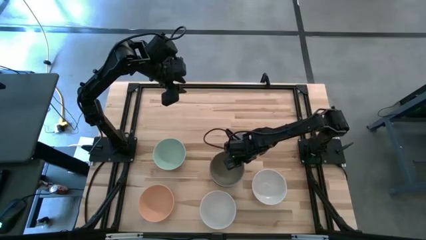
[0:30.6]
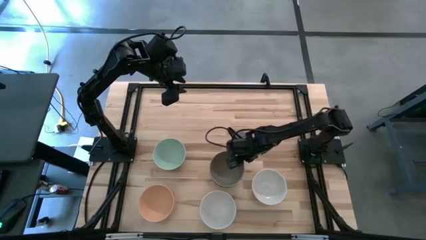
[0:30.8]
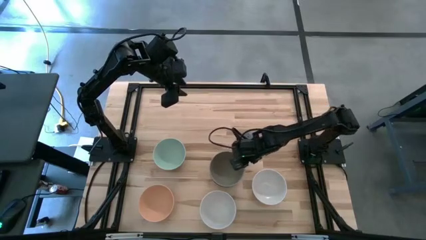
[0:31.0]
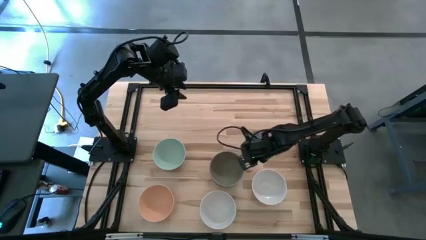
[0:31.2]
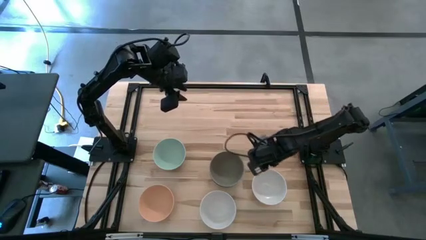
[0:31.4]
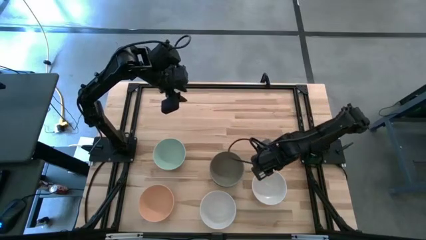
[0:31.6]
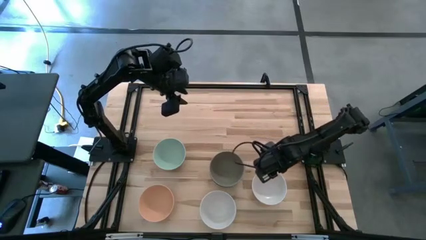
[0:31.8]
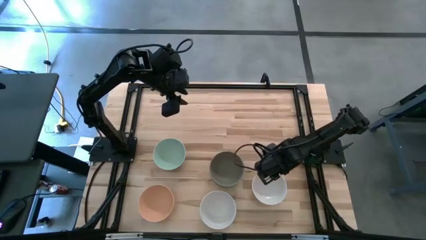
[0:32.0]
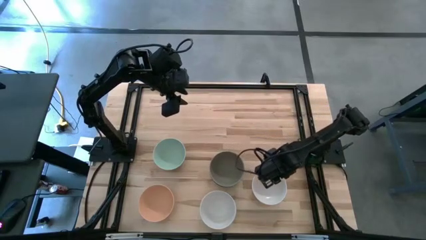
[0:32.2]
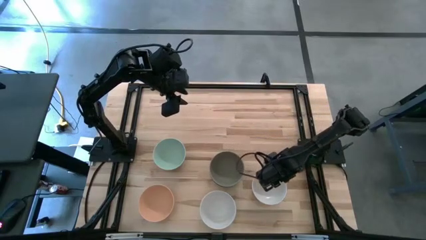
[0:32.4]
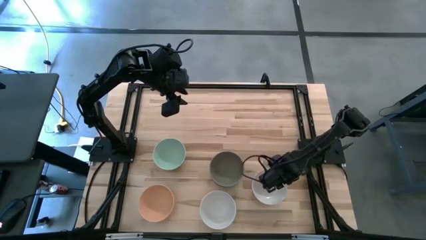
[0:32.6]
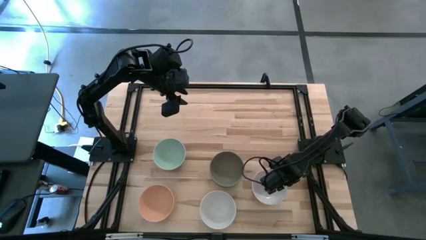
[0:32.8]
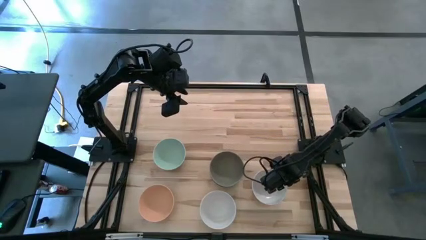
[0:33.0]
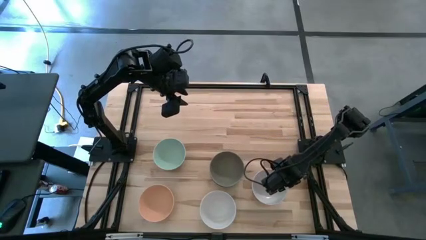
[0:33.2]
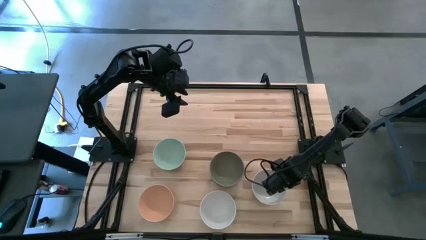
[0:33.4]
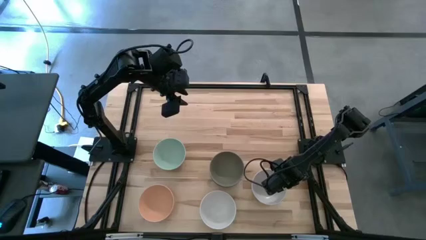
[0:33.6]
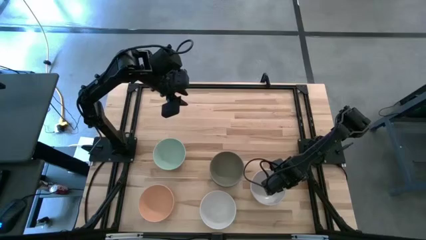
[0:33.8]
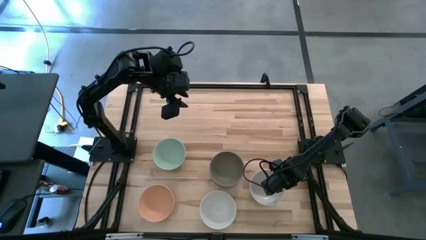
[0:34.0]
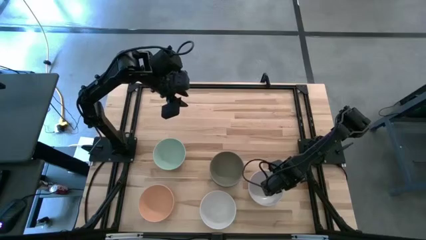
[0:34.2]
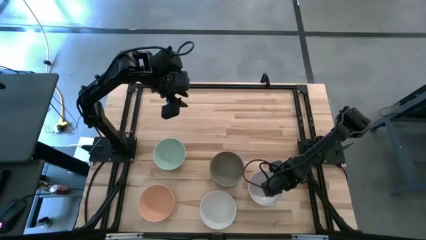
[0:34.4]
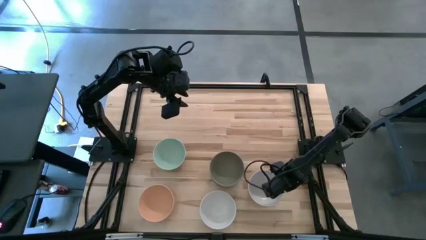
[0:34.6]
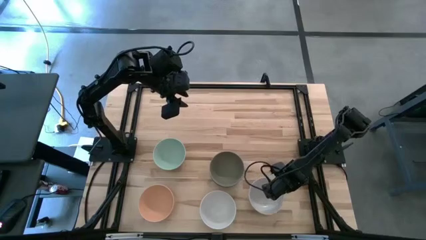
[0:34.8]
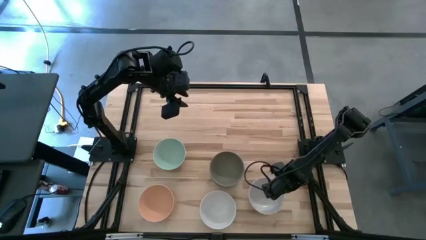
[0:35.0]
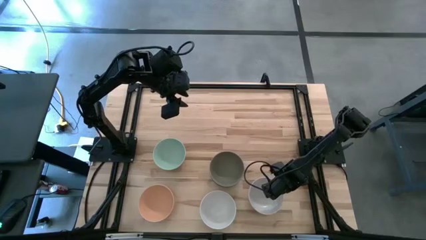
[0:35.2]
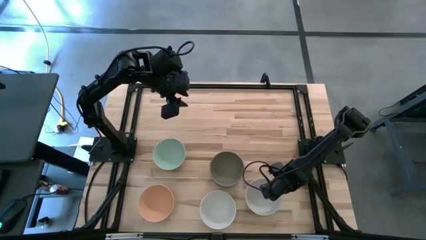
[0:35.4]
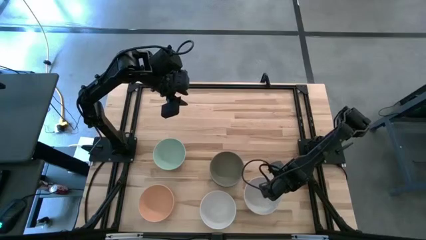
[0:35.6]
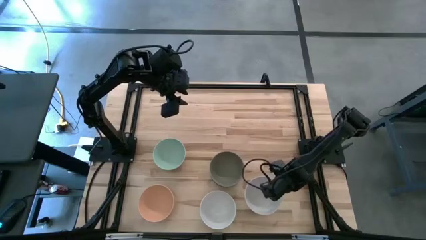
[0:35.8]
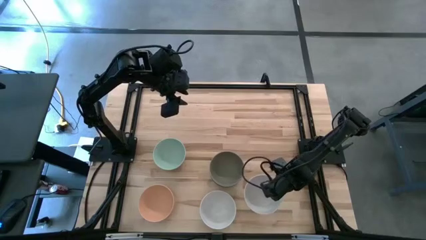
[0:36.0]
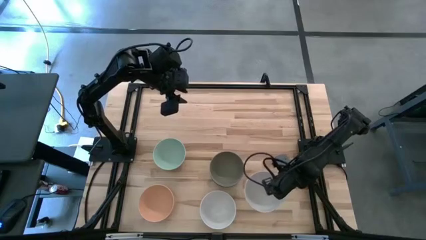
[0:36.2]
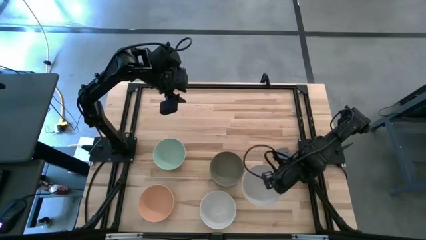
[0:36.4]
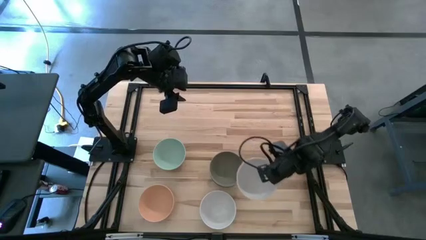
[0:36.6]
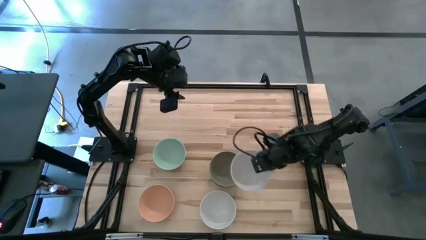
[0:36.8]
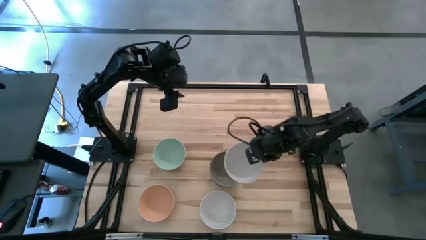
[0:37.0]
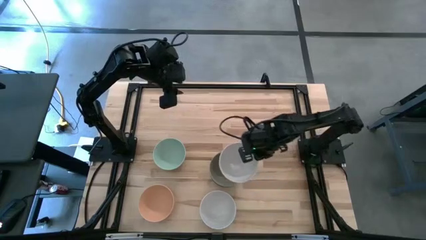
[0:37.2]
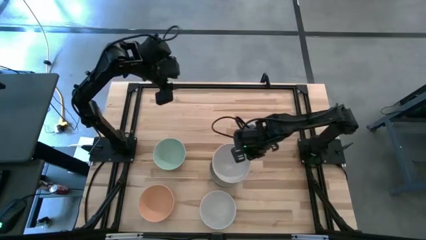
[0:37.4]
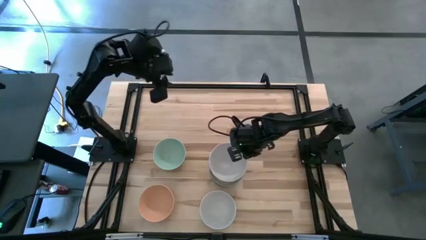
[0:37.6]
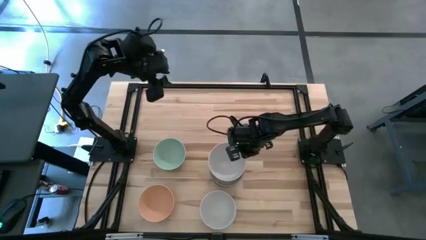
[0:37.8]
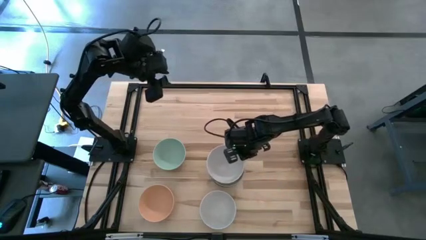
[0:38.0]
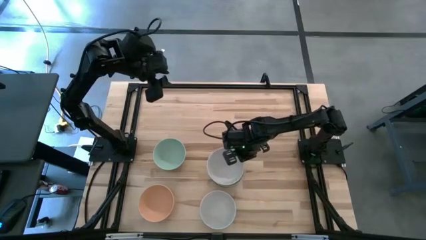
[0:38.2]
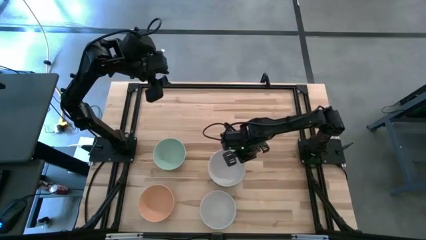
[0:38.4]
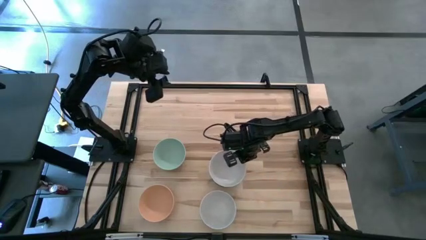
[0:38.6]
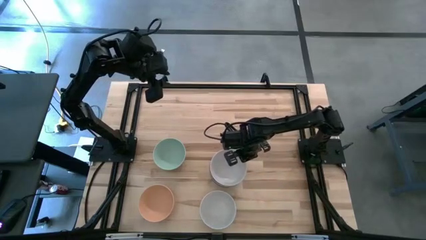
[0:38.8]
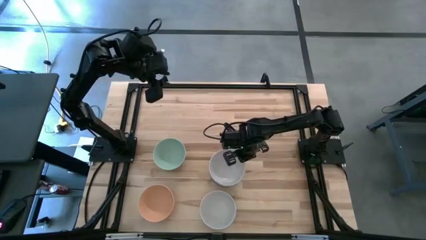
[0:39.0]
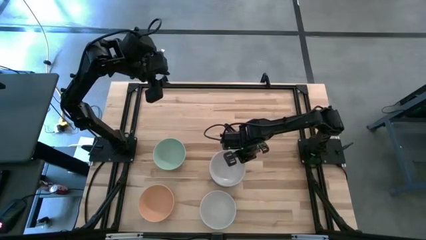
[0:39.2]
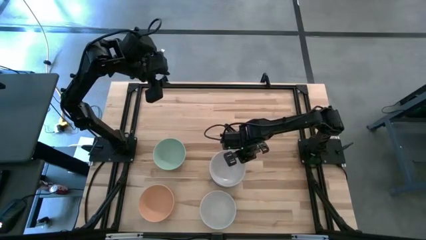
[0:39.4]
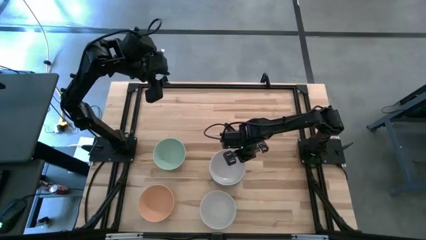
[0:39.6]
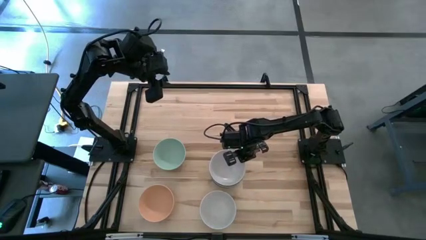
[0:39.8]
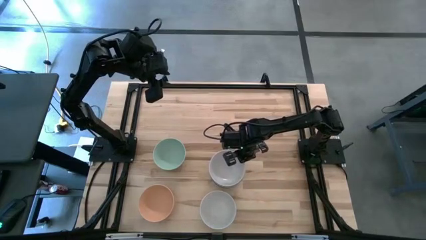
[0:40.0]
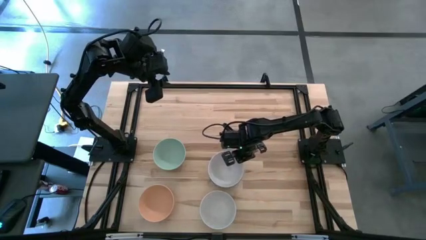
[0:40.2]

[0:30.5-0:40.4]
Task: Nest bowls inside each other
Stack the top right white bowl on top of the gray bowl
